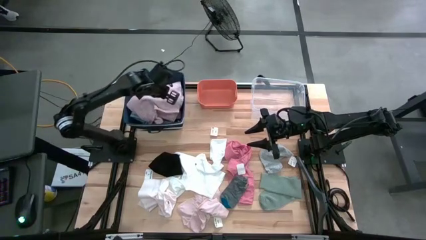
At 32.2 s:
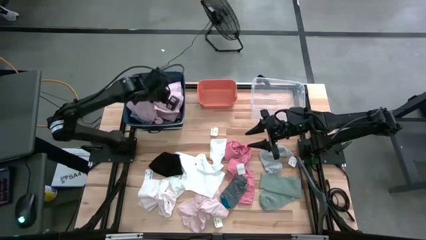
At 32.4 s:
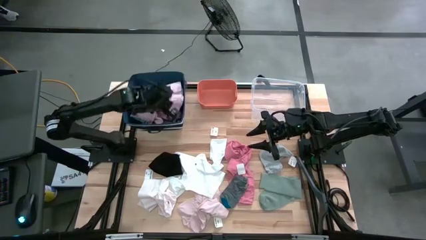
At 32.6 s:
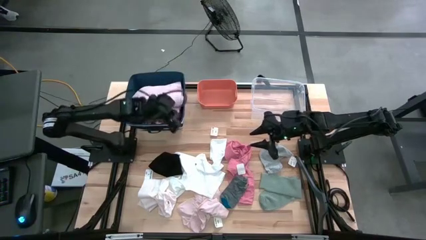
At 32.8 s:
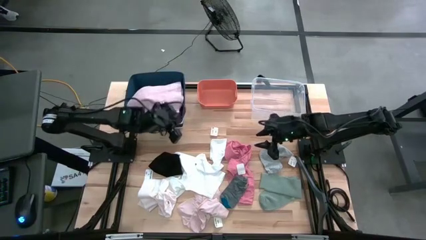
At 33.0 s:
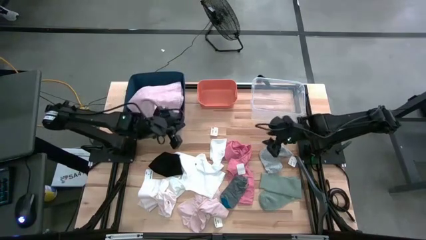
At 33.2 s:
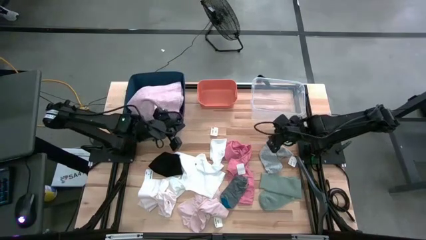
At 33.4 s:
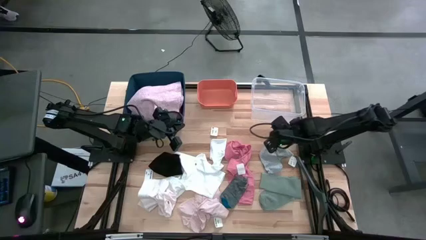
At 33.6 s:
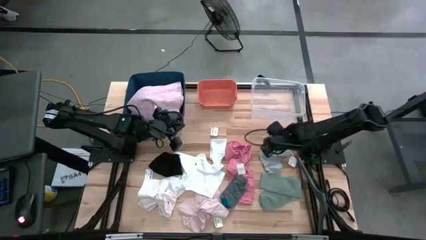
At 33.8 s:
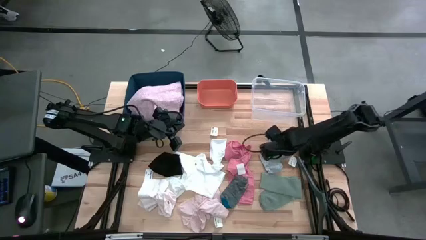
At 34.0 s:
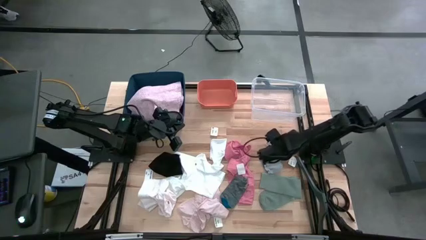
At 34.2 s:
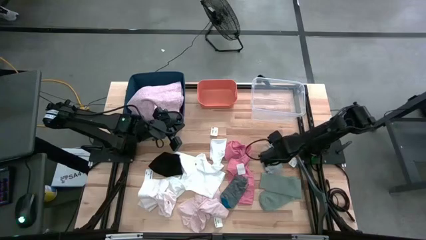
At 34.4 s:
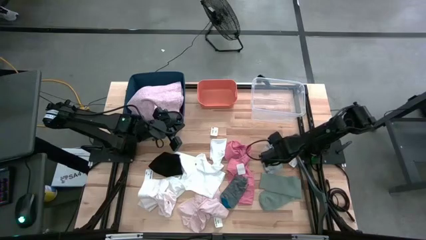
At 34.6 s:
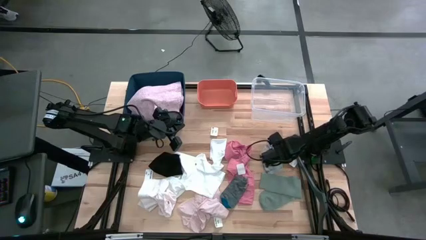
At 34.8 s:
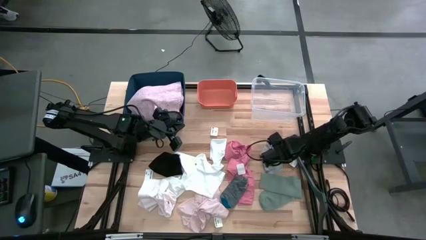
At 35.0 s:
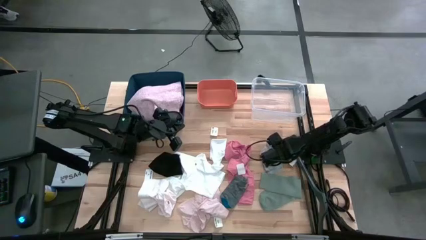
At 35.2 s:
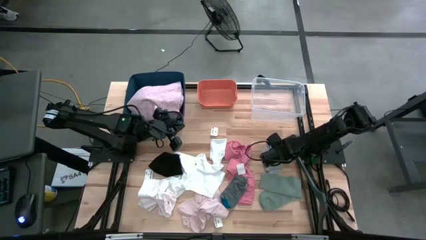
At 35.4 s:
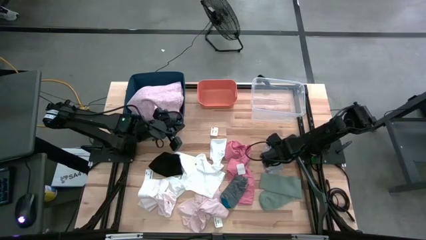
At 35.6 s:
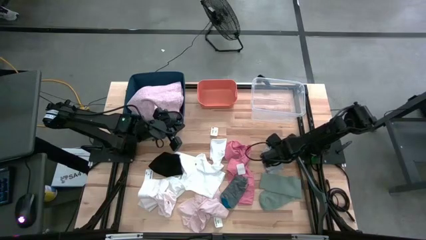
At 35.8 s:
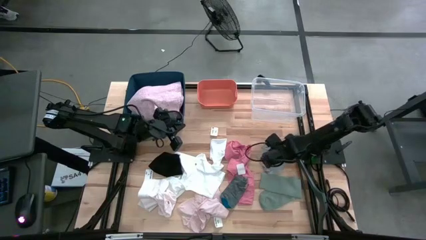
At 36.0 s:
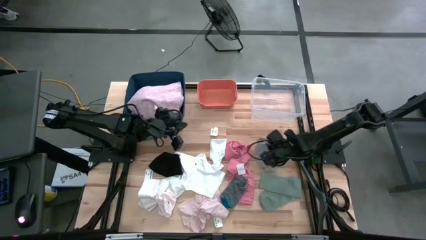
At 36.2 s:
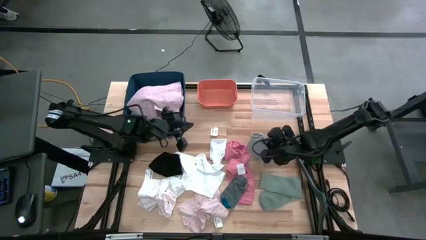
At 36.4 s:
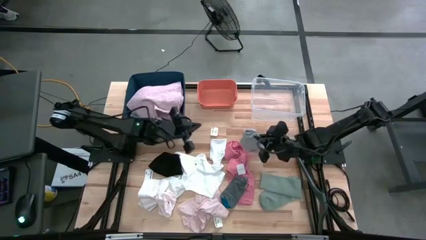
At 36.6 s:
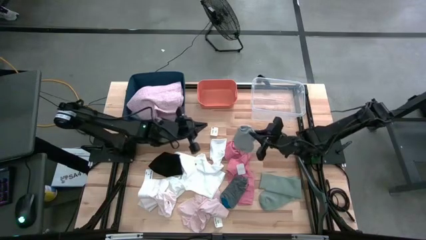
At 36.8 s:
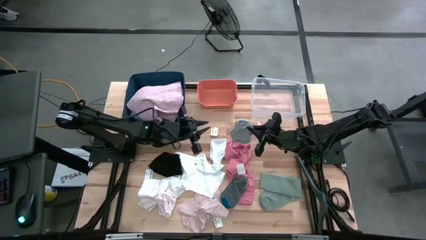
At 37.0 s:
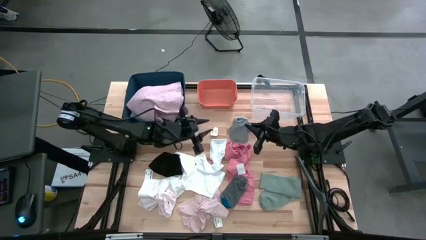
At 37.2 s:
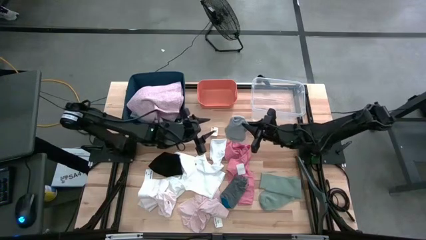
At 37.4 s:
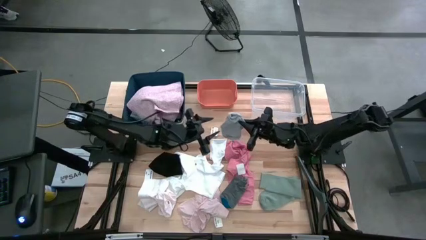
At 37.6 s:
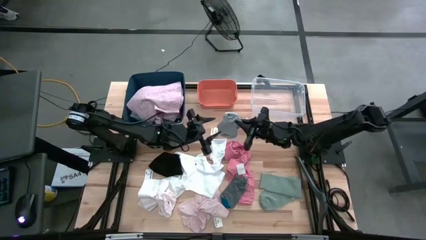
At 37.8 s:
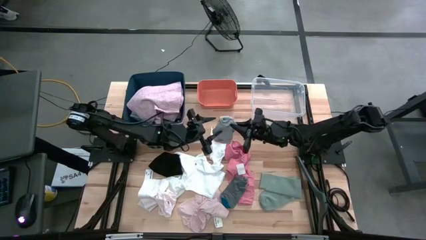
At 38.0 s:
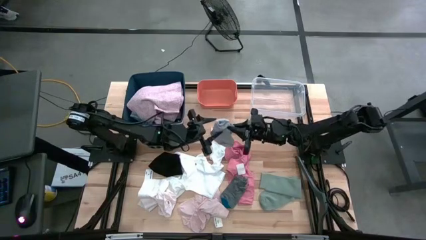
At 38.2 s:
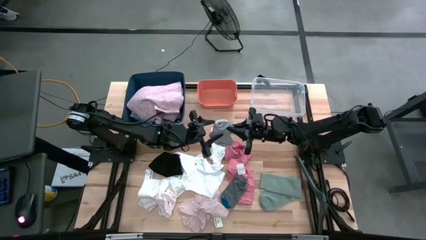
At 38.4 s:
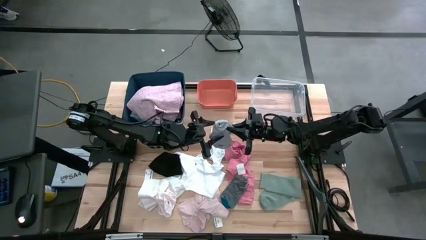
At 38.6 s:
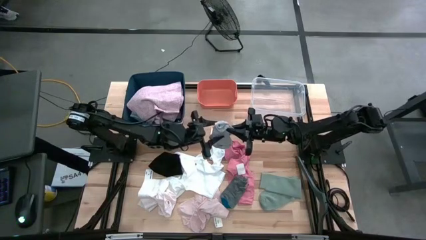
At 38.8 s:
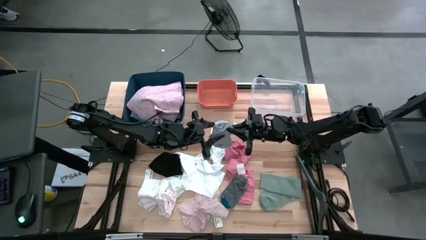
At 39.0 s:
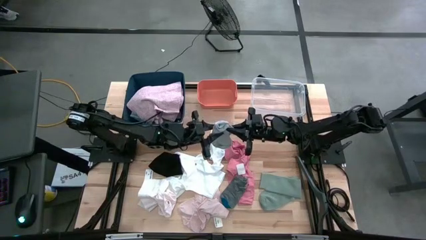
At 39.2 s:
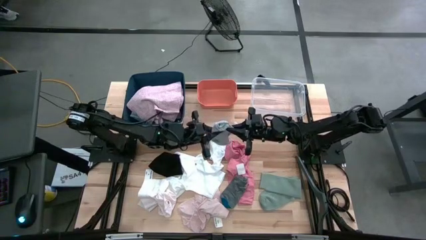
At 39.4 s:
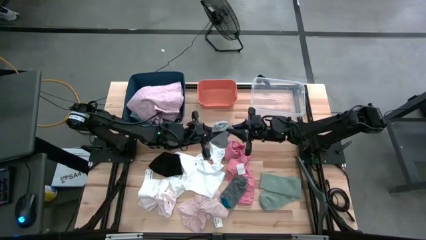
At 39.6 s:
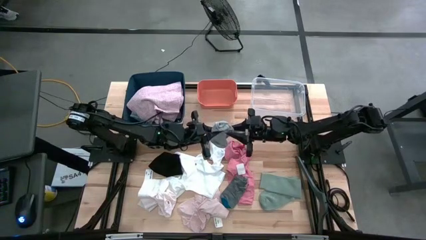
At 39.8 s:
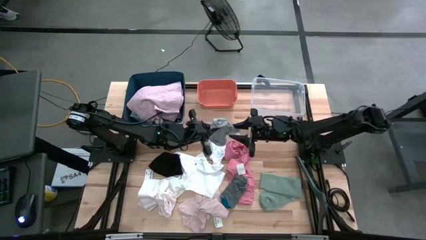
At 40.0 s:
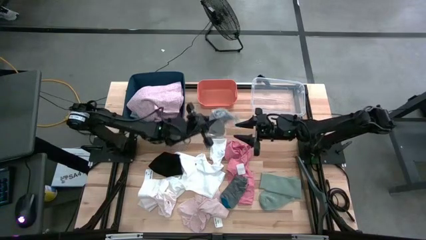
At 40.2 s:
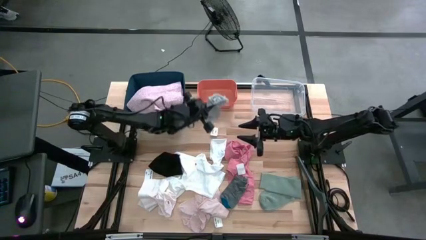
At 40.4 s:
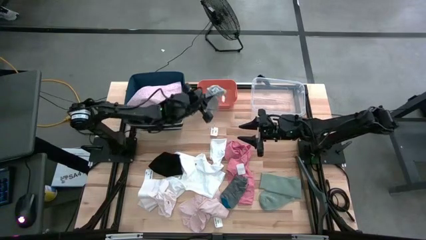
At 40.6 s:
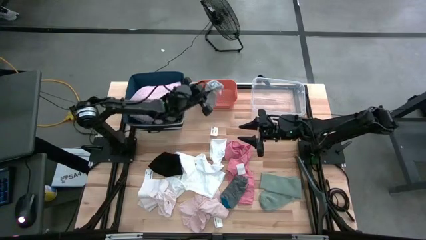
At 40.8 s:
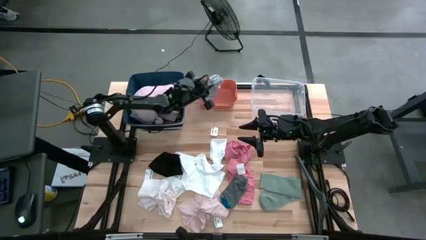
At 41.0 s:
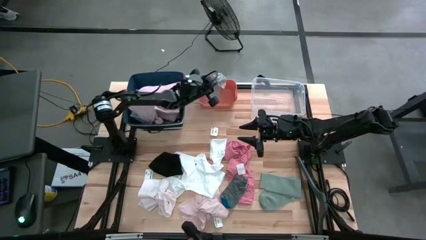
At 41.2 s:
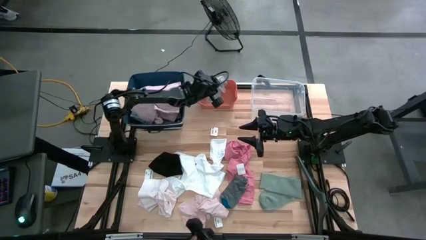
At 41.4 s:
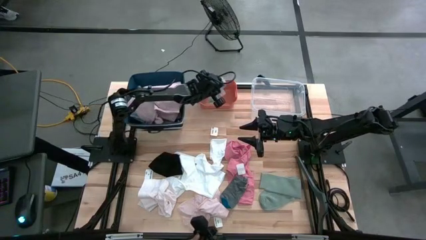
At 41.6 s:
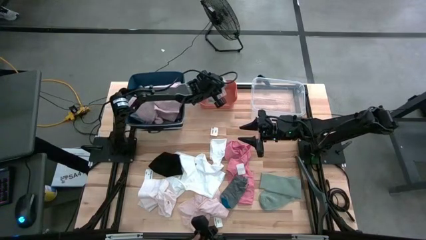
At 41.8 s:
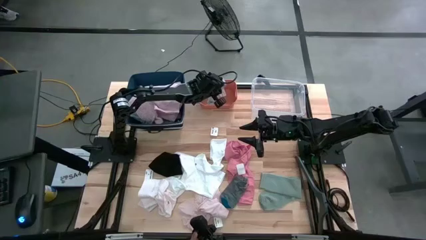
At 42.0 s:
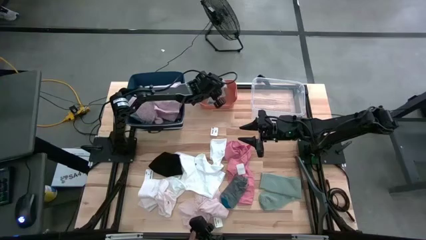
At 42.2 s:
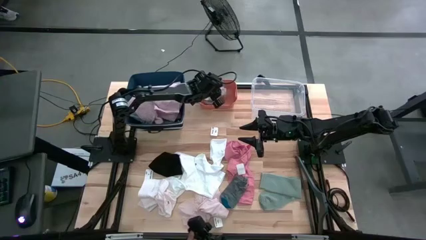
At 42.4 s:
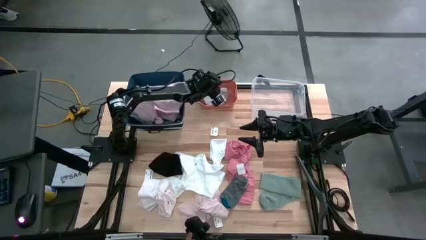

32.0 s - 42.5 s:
Task: Pick & Place Cloths
Put the gray sock into the orange bin
